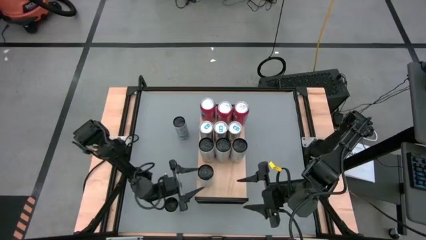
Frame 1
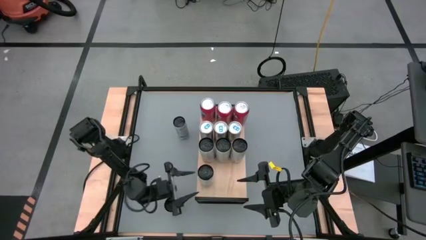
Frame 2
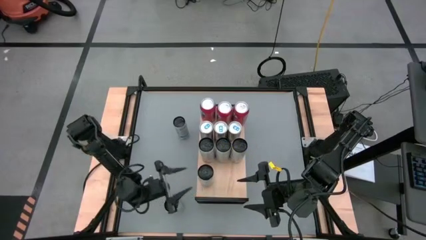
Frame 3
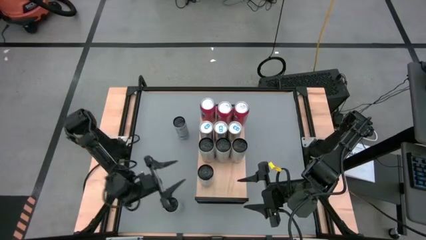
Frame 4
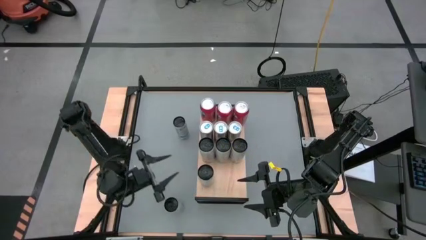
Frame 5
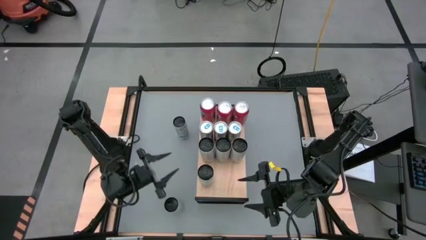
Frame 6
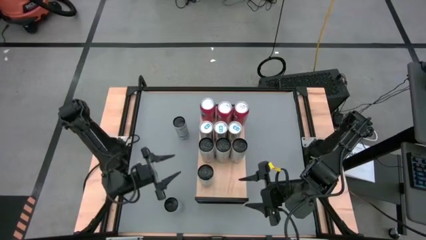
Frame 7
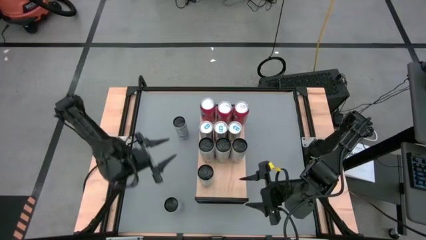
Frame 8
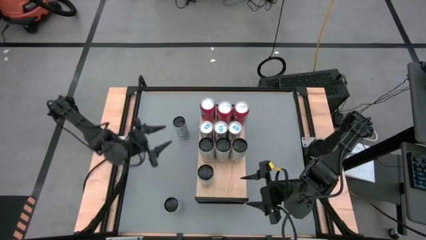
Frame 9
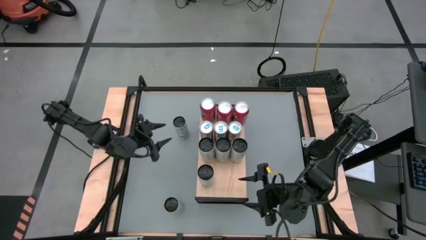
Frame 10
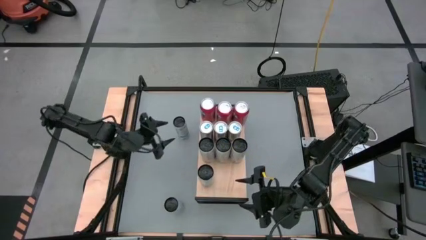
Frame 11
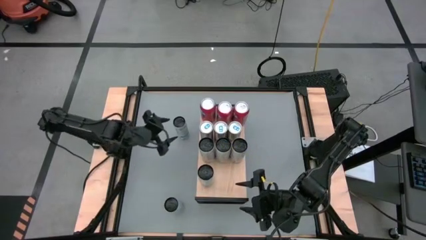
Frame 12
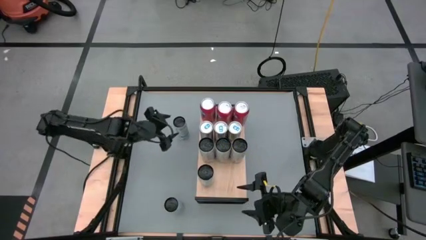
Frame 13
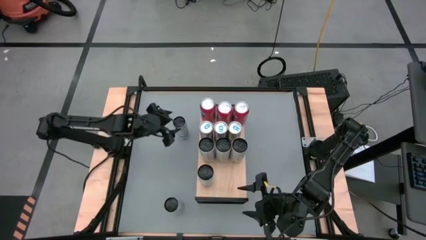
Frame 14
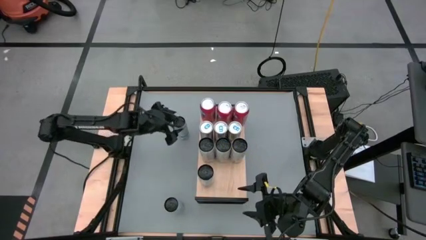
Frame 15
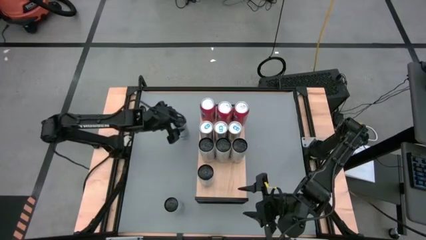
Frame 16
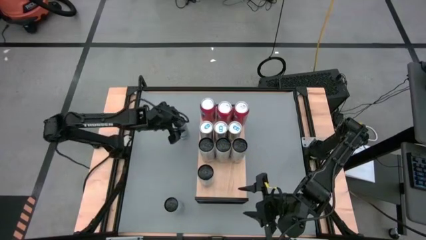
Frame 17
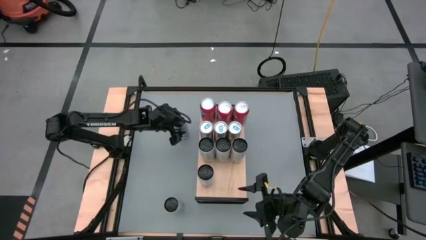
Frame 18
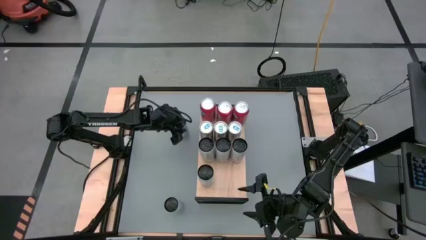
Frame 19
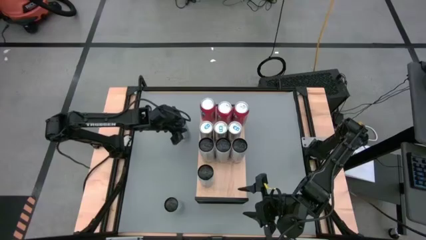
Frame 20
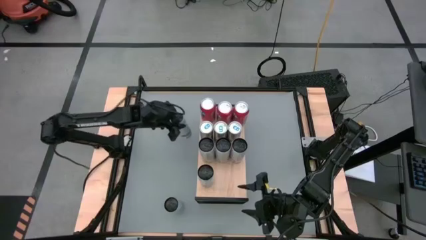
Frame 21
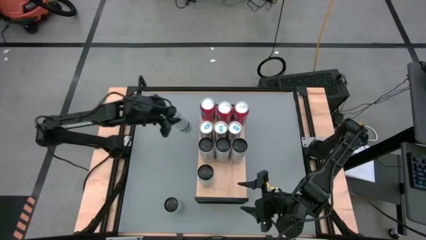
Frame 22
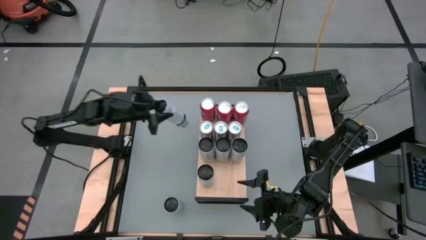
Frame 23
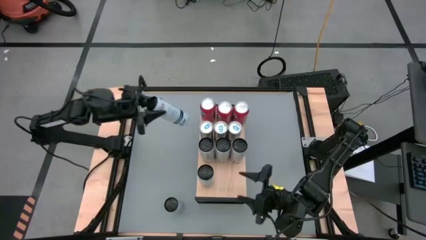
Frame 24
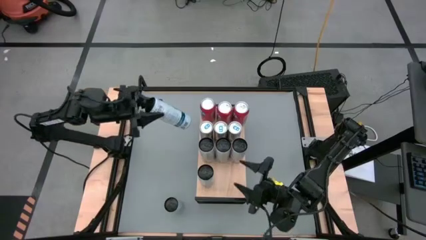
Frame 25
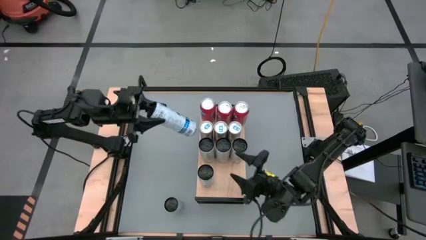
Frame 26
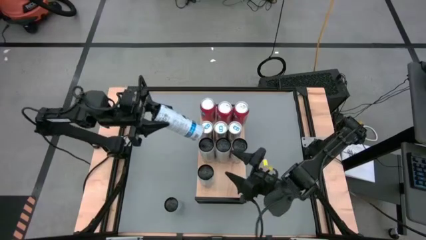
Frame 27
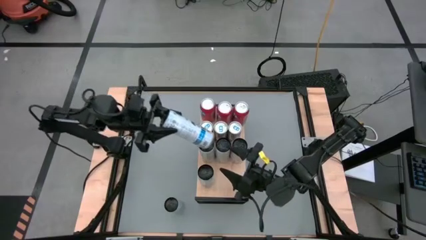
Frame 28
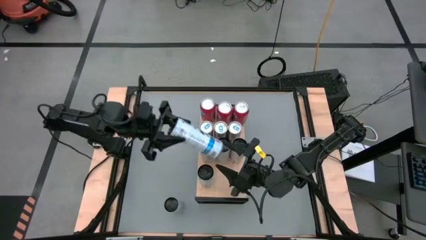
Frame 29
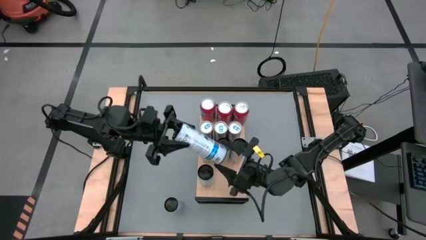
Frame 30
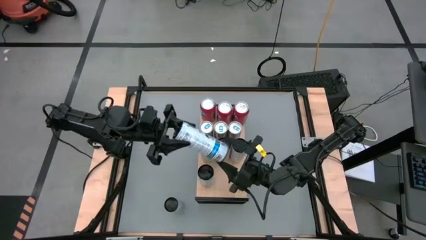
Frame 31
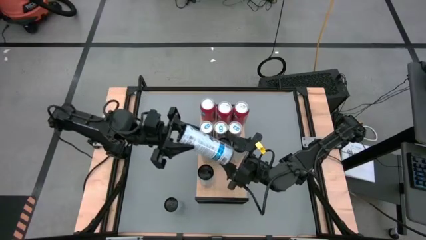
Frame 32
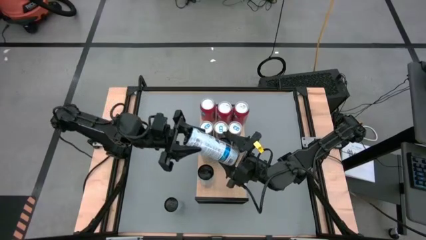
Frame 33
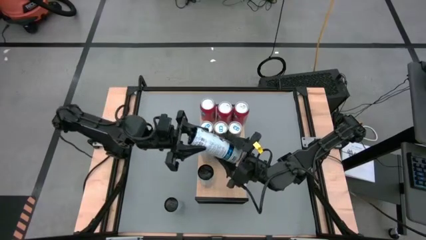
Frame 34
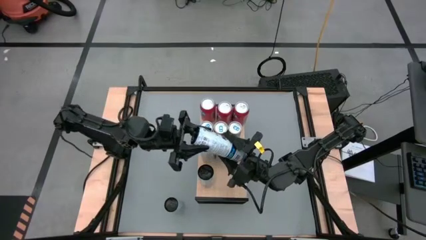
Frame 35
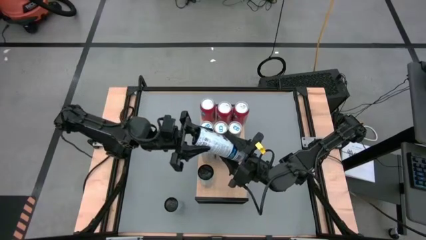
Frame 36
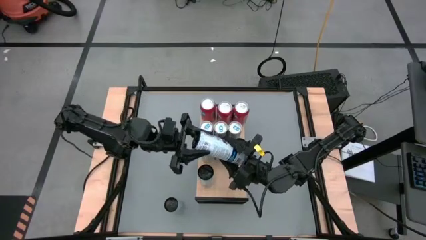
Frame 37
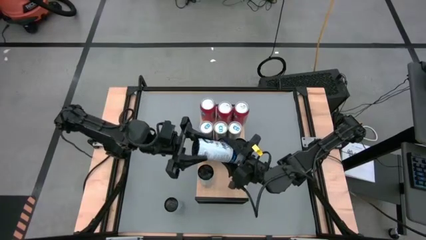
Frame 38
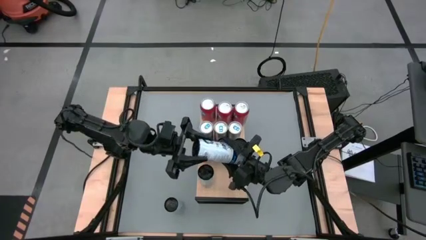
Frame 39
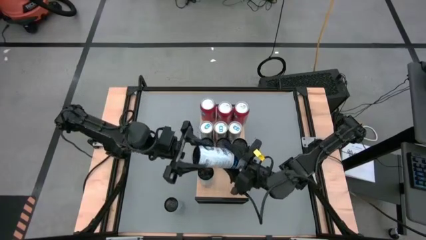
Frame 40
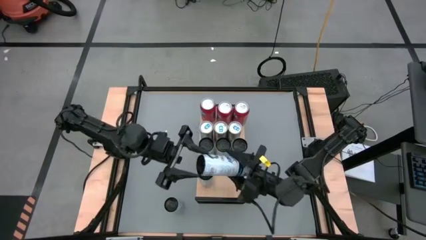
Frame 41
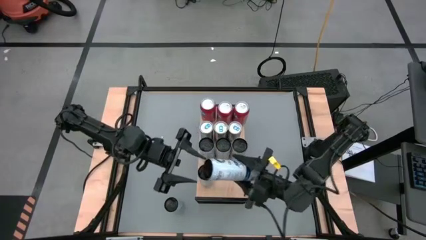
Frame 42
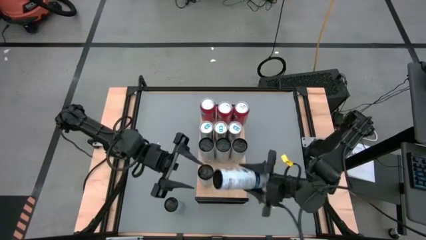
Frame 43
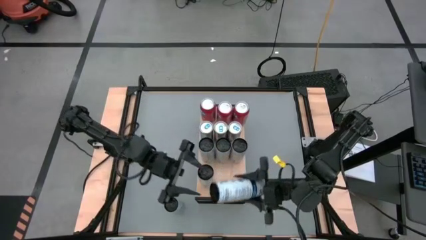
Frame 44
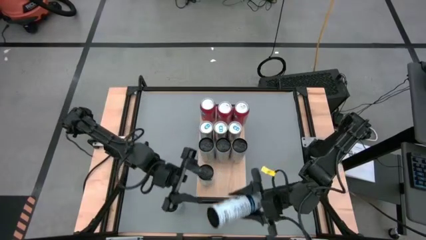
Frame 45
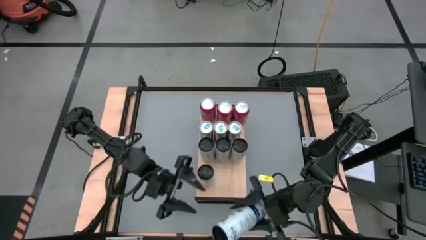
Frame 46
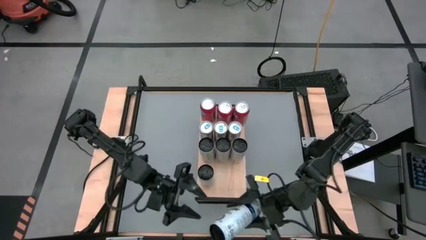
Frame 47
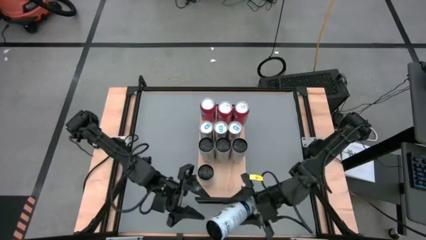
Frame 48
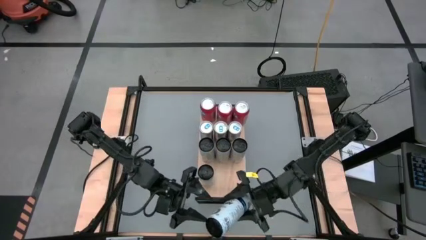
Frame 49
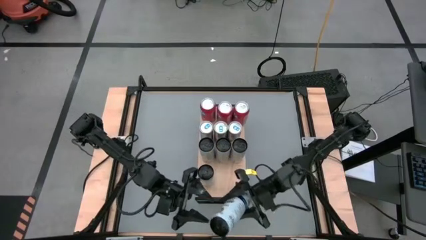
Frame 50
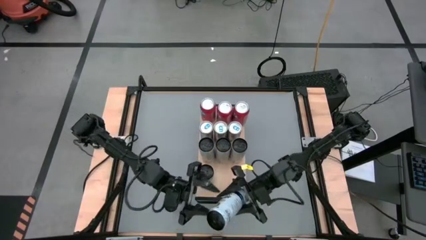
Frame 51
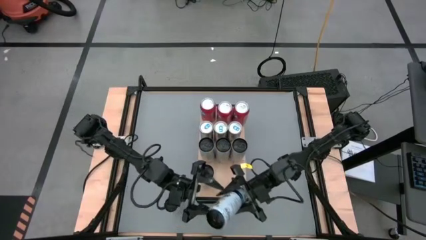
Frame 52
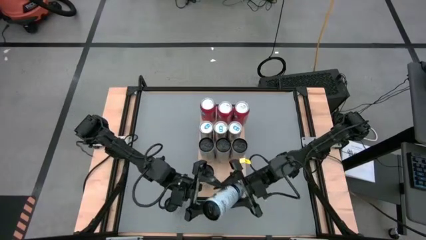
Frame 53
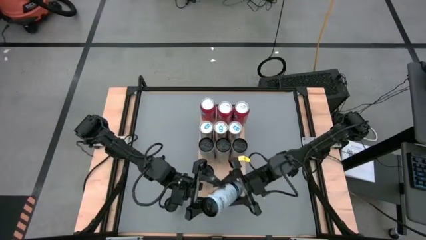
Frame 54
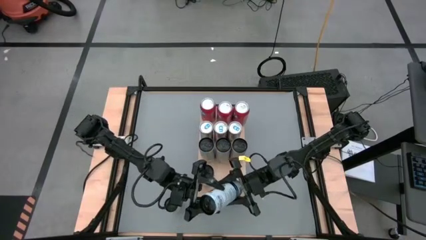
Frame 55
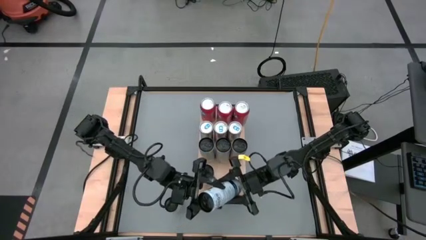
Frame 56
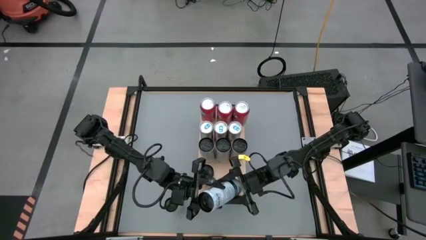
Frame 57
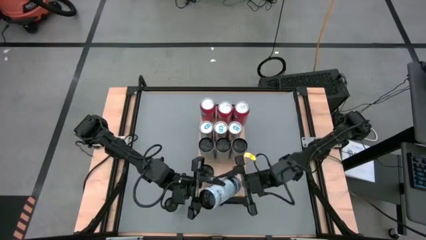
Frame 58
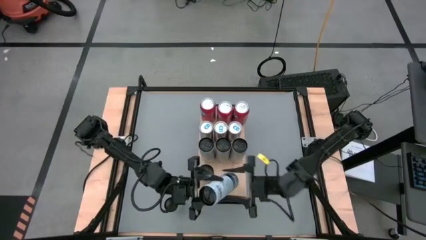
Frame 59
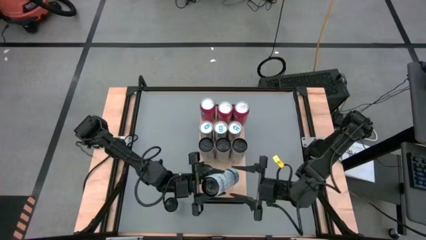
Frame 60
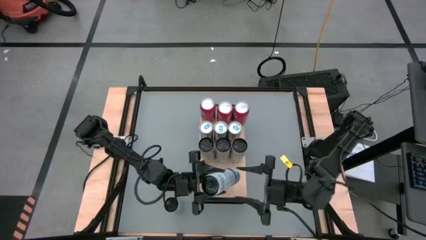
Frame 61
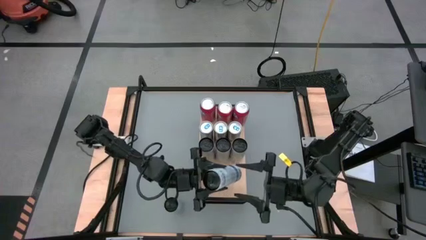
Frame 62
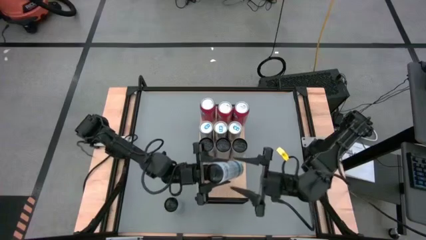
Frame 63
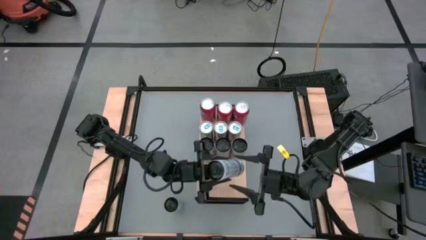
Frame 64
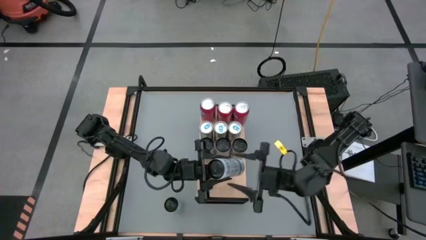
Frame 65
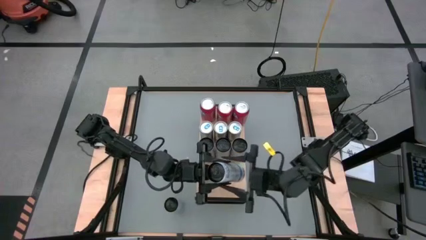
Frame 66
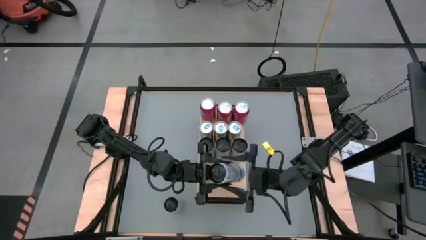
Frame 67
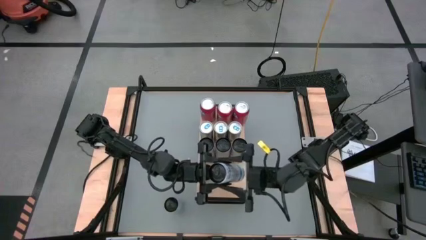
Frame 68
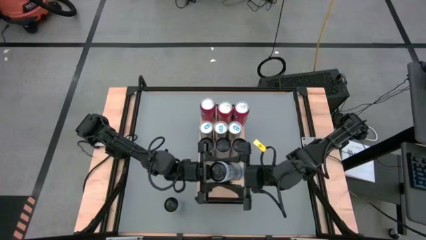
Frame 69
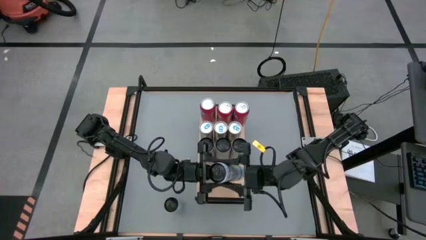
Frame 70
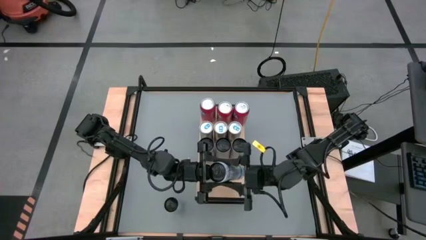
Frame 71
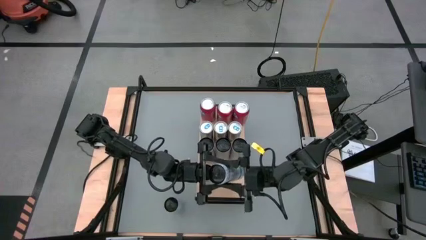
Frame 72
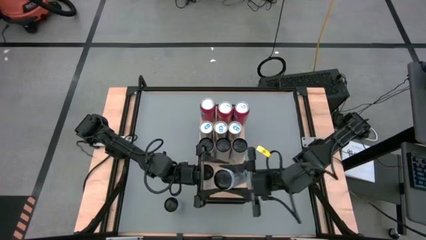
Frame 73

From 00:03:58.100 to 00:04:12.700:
Task: Place canned beverage on shelf
Put the top white soda can on the shelf aligned with the other white soda can
